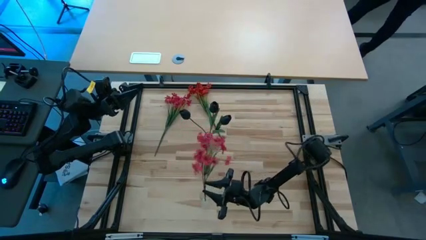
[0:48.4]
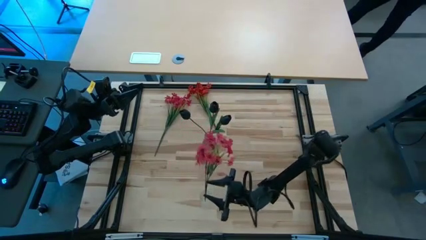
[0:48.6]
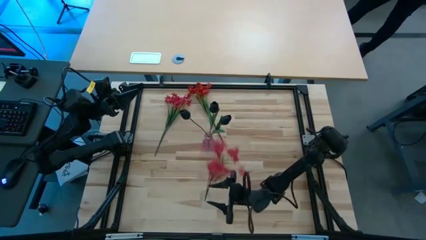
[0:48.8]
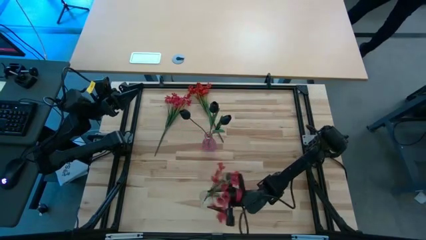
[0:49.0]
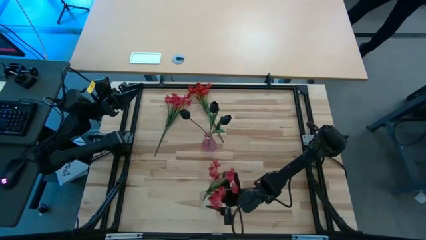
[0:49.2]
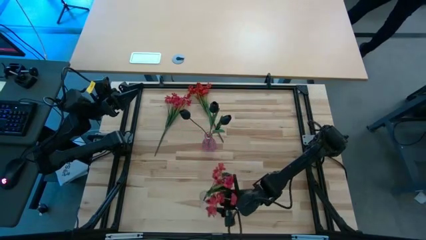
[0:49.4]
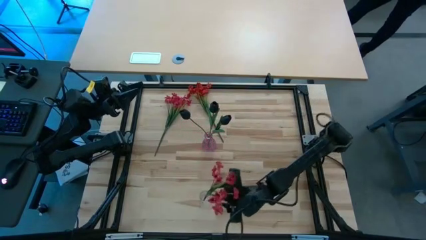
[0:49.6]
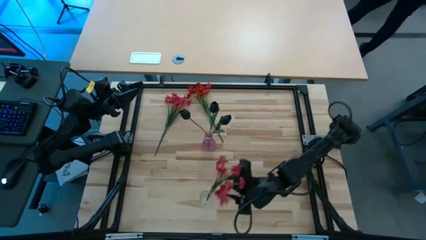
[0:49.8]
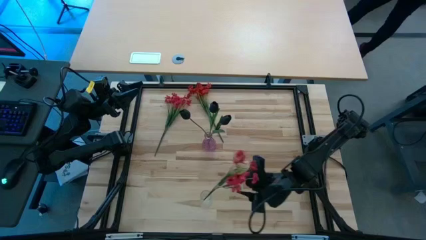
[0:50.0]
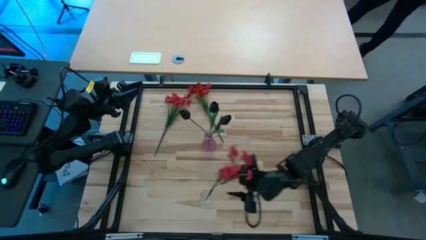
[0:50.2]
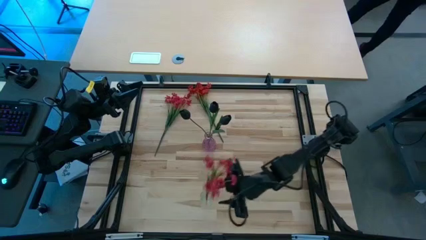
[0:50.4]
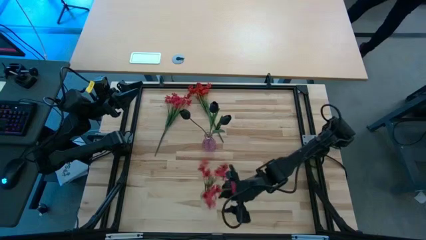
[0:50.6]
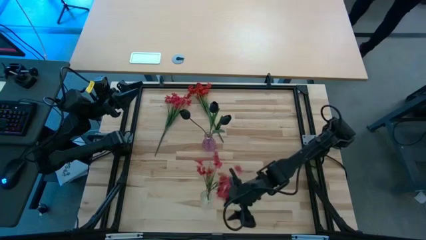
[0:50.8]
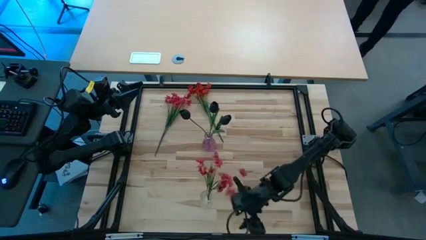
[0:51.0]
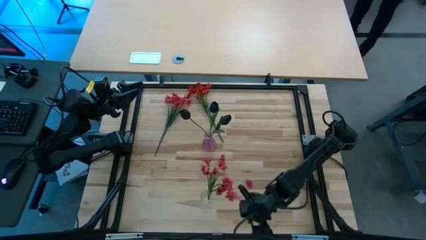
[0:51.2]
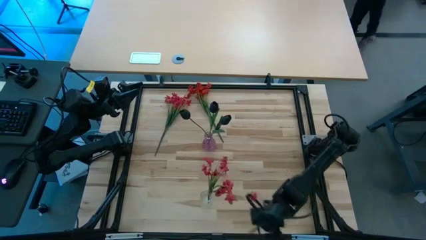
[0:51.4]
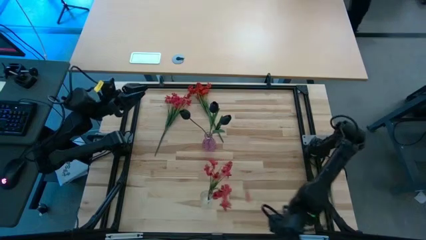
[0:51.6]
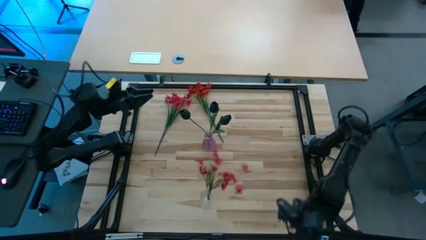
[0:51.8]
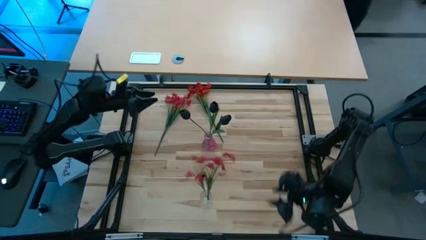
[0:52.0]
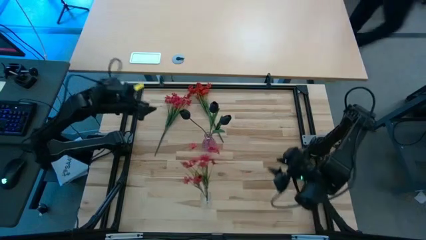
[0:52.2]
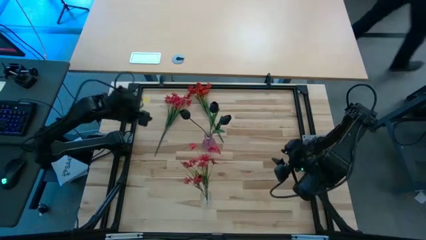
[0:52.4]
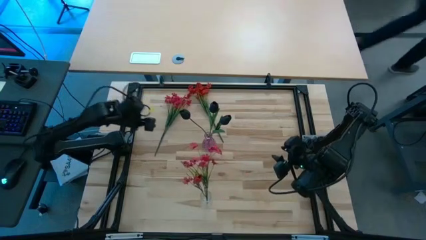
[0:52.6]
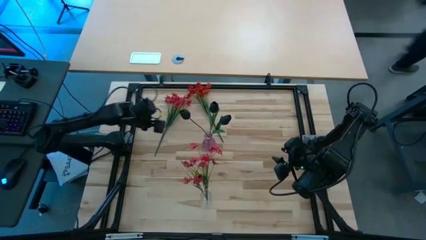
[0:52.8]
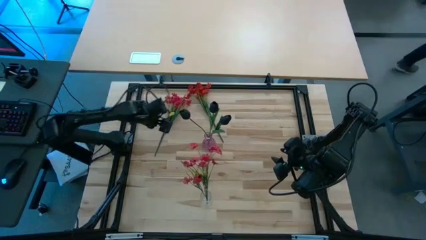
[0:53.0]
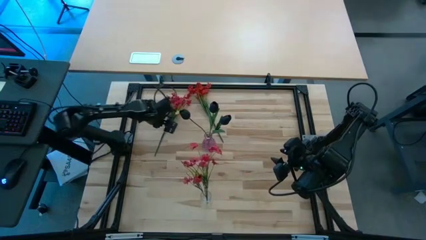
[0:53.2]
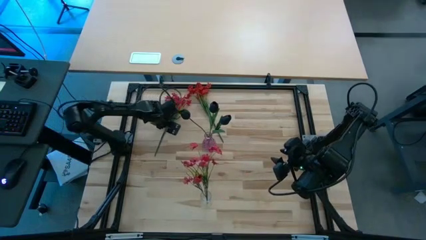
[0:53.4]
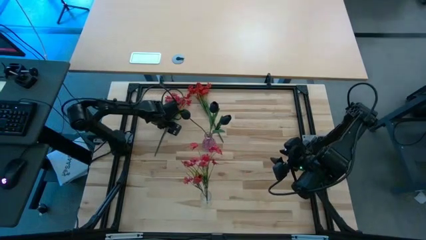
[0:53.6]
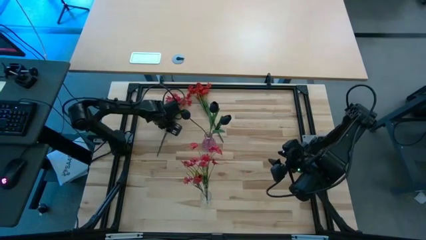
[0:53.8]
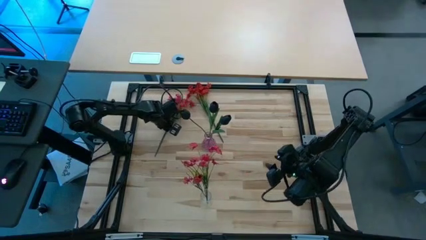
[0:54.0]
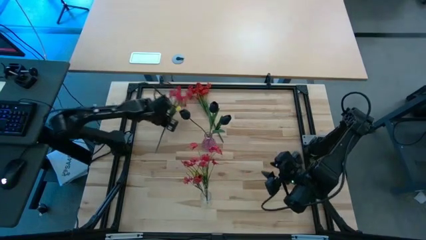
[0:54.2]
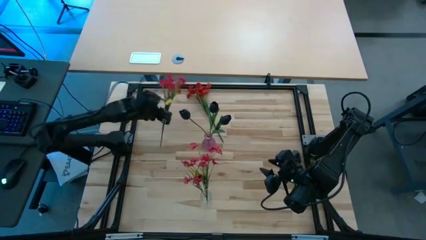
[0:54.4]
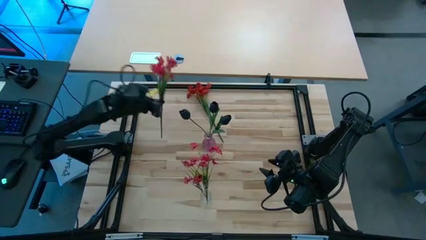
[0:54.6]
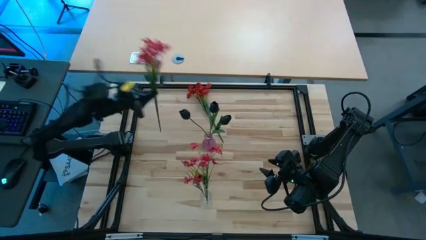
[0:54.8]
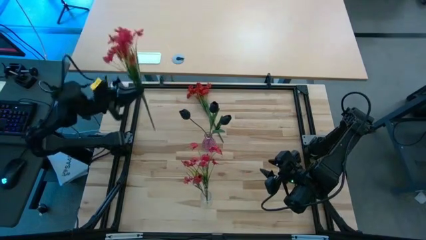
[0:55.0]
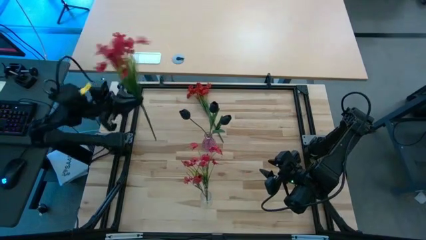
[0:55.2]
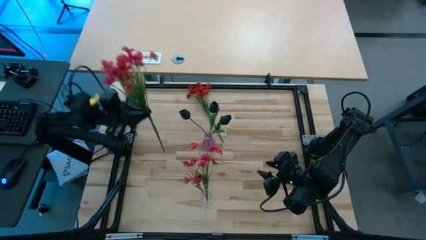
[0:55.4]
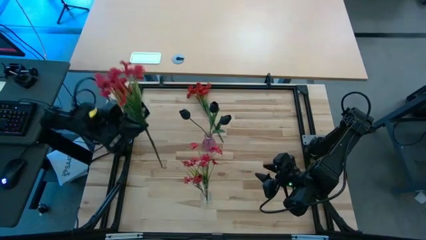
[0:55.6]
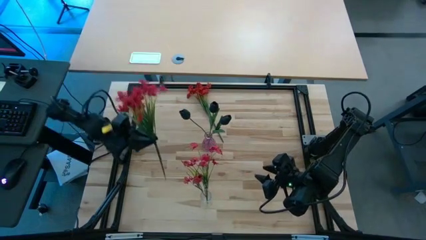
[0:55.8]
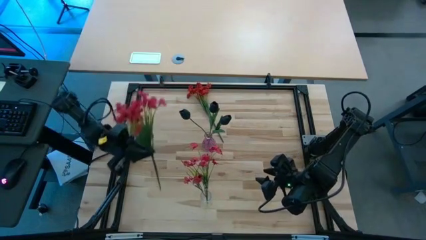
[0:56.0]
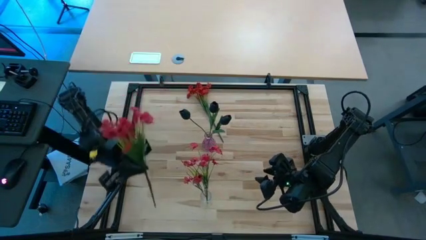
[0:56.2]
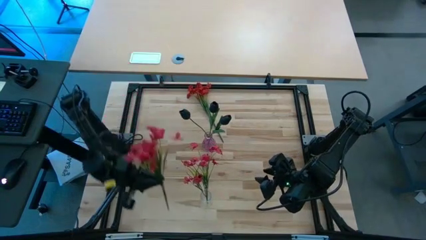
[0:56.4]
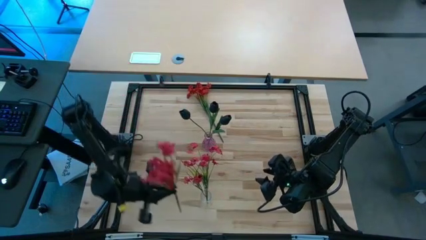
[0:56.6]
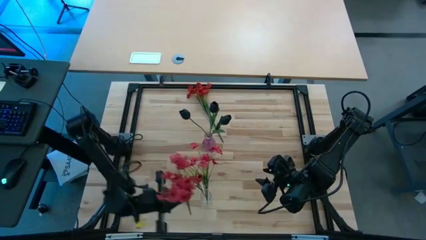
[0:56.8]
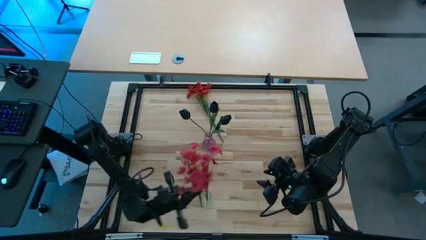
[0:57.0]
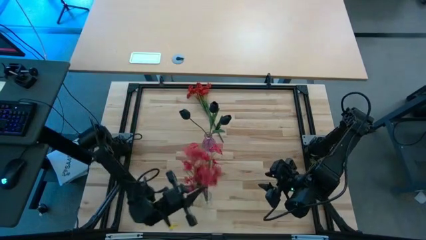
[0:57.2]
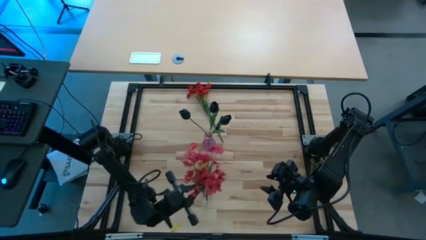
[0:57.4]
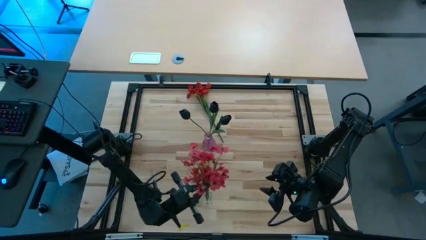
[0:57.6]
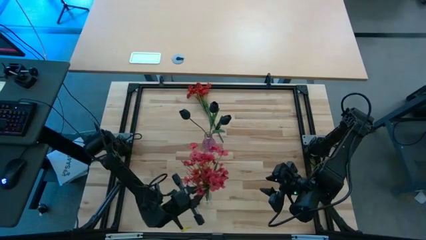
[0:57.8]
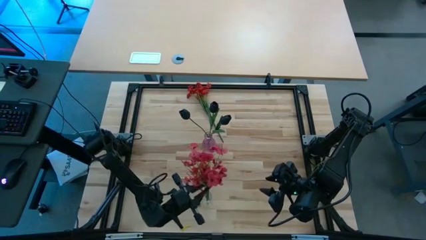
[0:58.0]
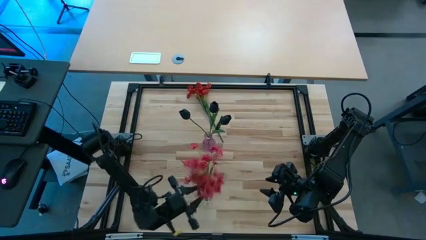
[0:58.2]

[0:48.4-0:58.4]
Task: Sort flowers into vase by color
Put the left red flowers into the transparent vase

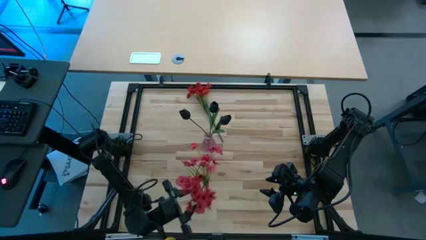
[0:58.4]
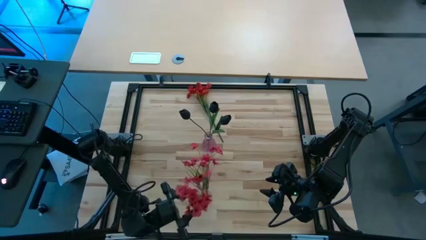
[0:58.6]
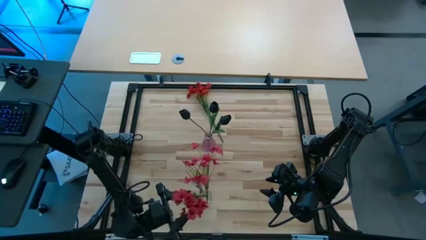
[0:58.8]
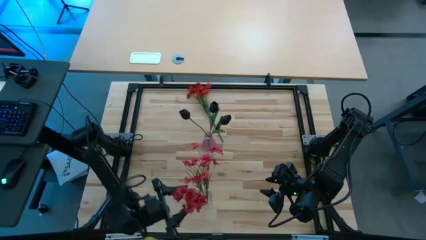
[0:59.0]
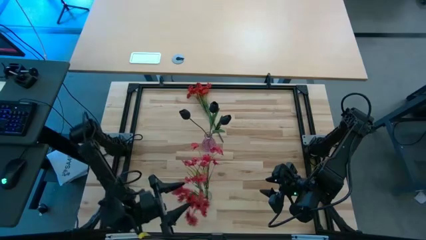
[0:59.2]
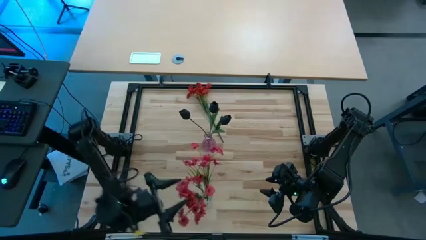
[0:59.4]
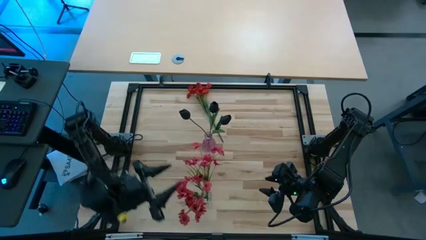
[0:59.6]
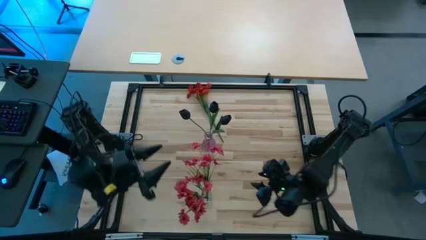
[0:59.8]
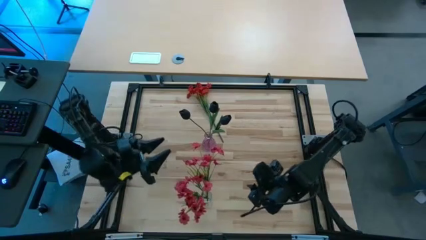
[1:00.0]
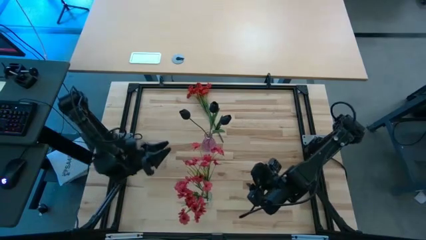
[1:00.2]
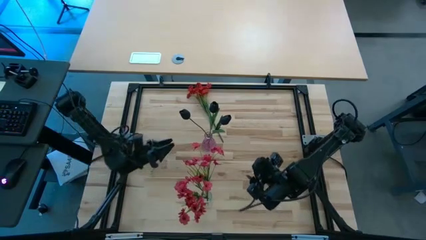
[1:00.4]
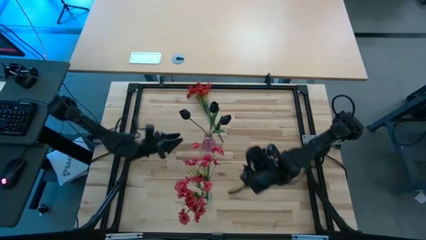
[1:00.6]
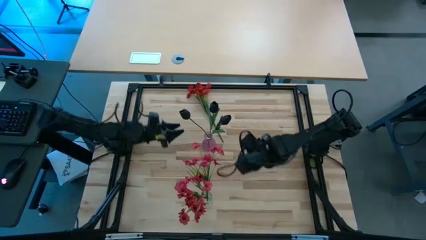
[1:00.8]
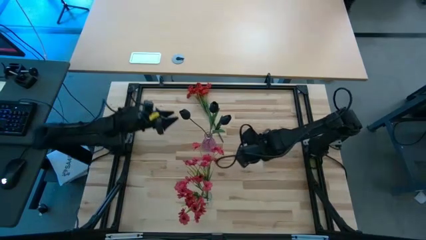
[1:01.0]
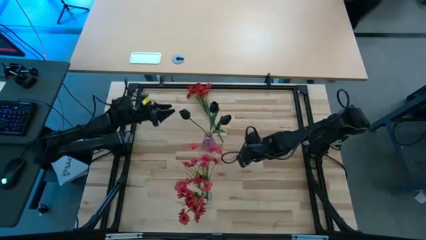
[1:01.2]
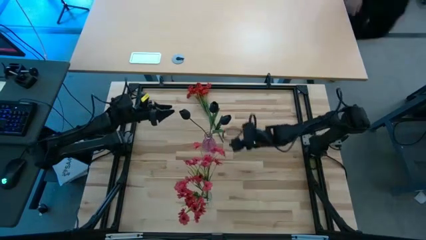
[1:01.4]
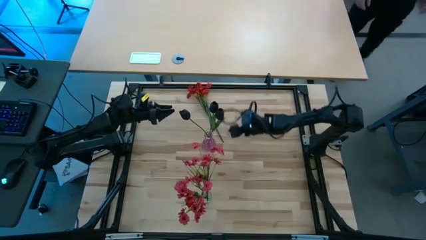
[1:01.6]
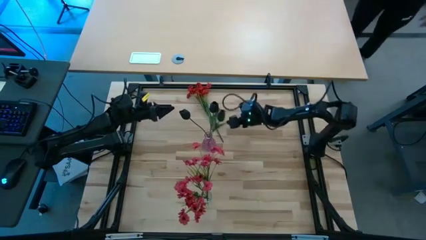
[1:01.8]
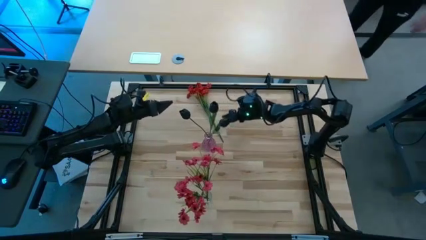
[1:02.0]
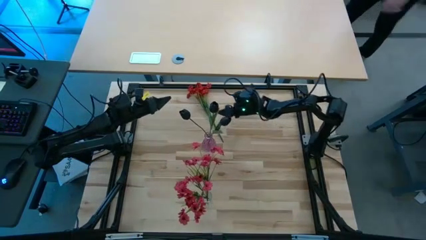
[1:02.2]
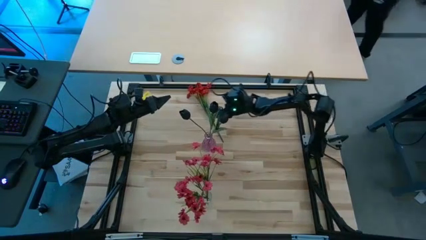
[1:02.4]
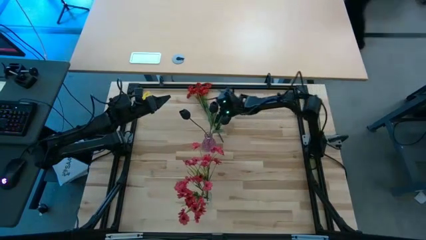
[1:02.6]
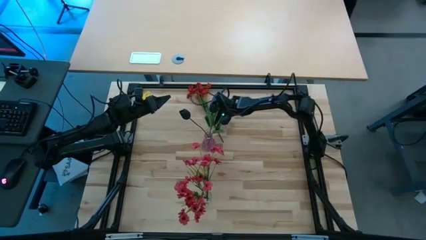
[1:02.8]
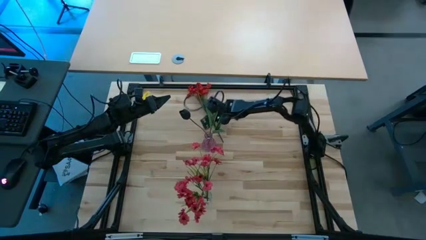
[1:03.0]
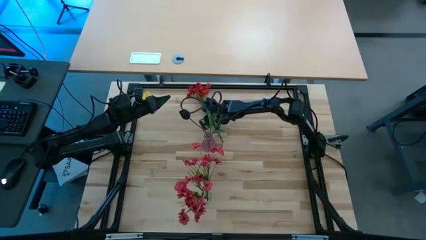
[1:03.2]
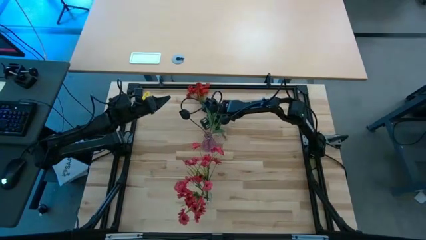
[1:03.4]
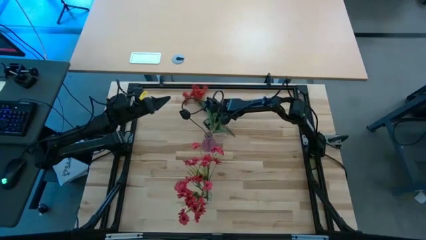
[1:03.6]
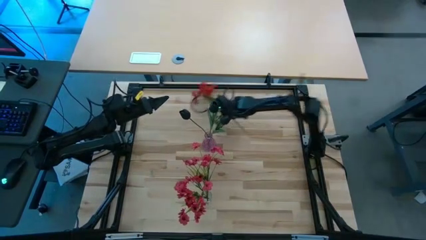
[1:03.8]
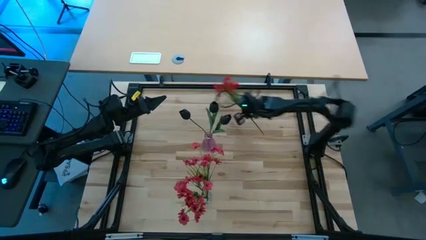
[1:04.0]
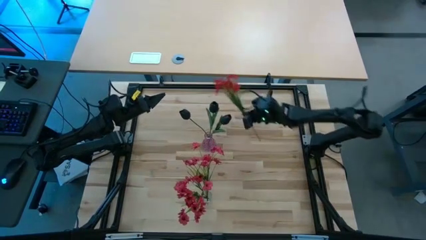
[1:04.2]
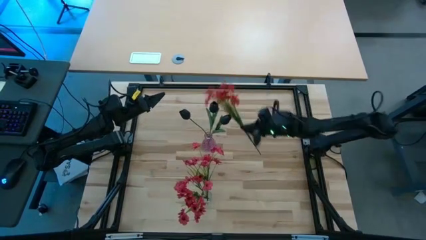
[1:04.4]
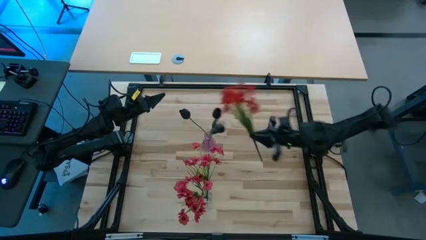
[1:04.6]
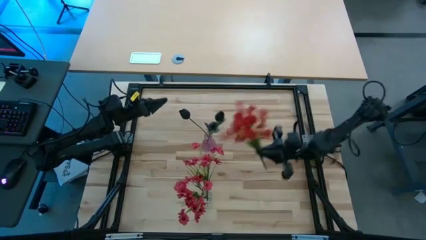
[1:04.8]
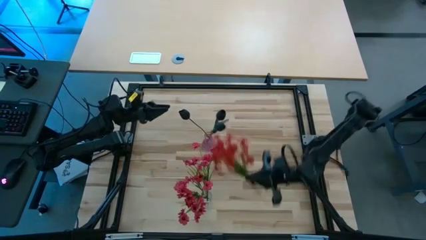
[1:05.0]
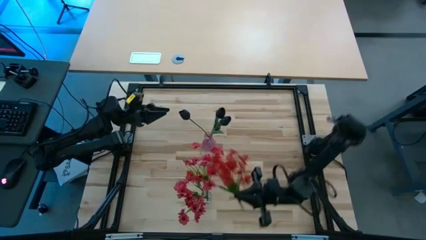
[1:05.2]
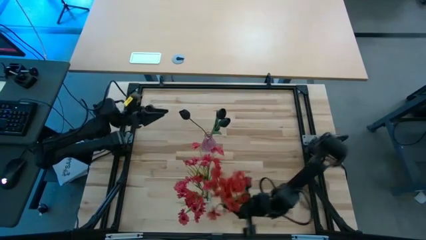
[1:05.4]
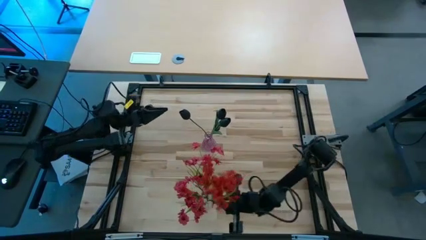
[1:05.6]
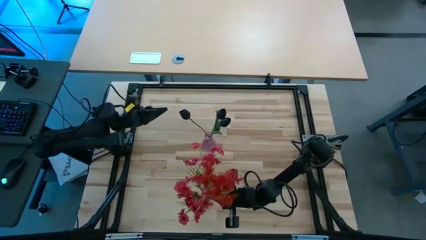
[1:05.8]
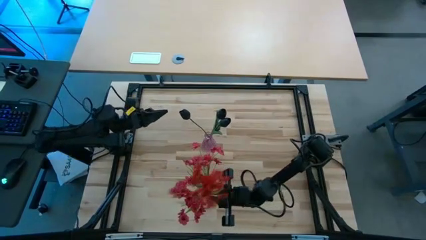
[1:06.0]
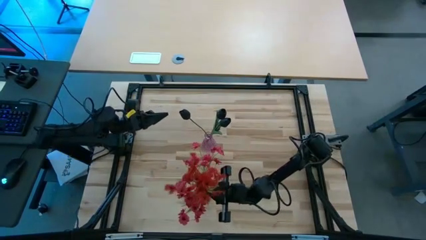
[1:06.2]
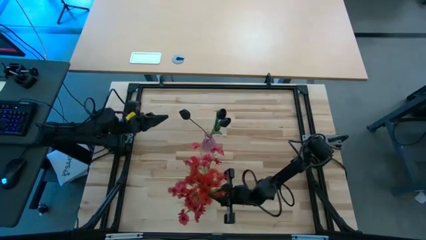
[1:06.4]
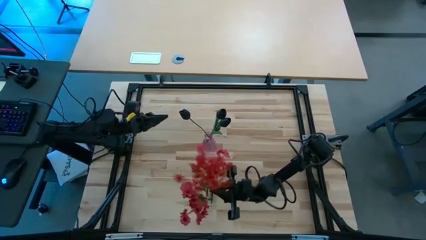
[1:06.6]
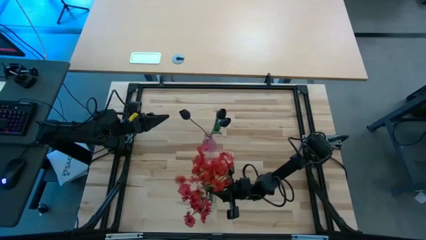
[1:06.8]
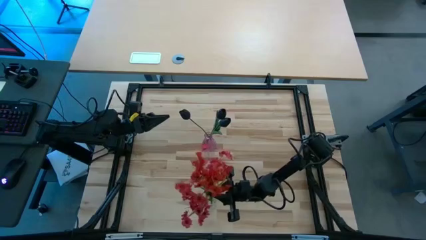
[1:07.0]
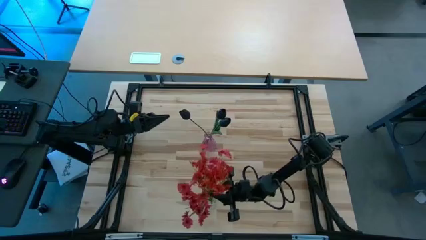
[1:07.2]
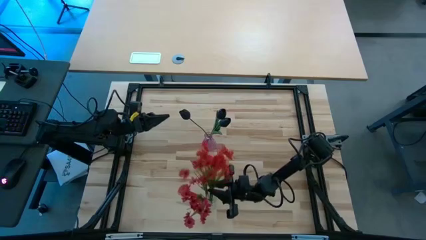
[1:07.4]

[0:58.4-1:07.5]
Put the red flowers into the transparent vase
